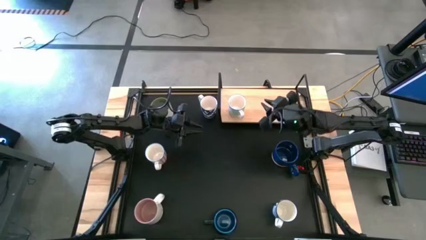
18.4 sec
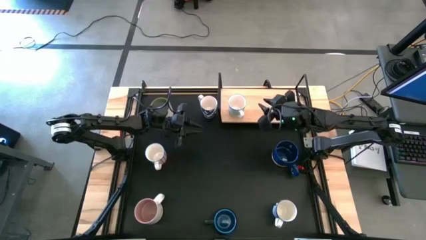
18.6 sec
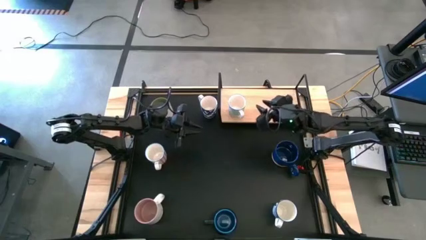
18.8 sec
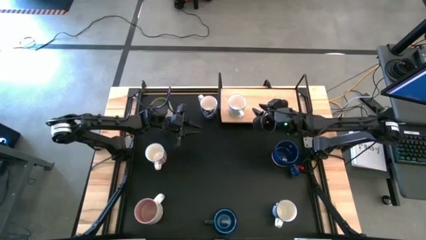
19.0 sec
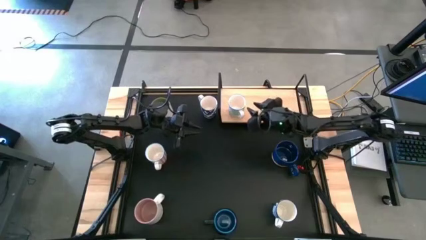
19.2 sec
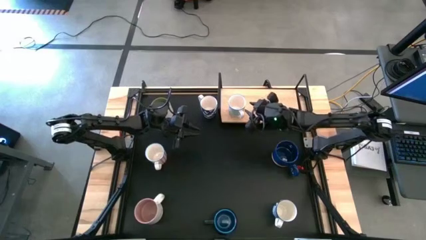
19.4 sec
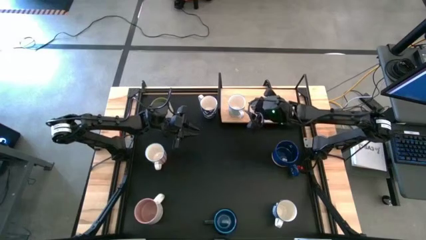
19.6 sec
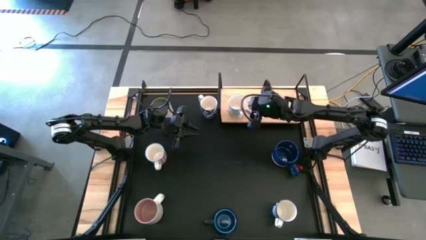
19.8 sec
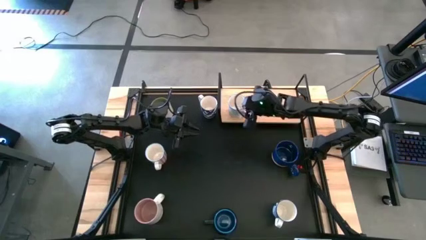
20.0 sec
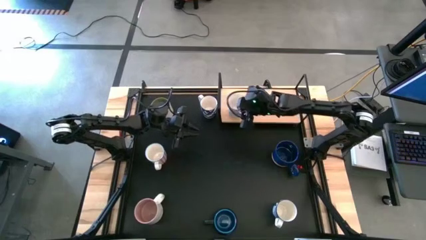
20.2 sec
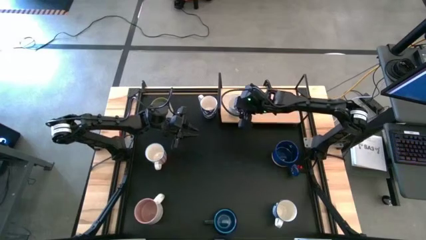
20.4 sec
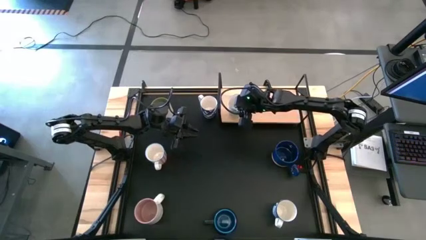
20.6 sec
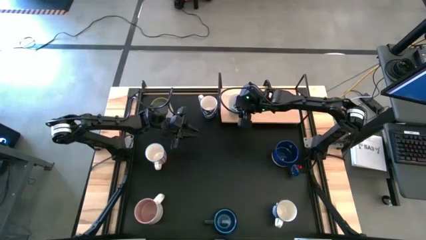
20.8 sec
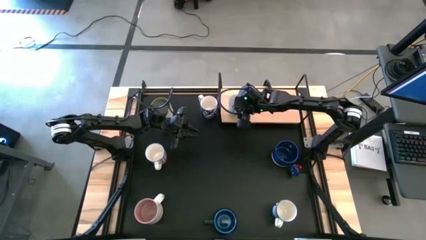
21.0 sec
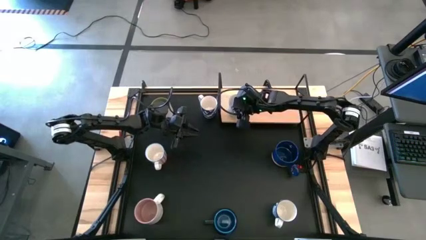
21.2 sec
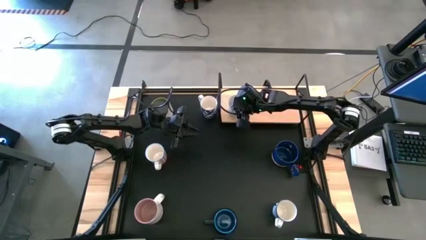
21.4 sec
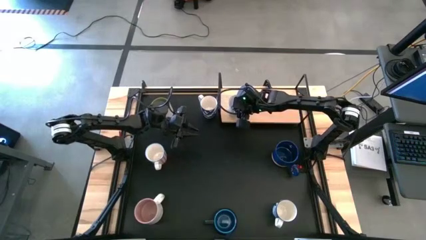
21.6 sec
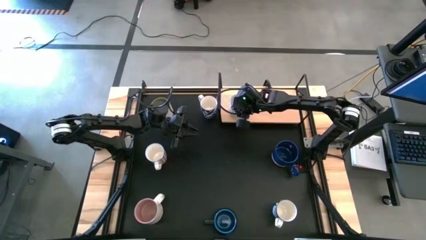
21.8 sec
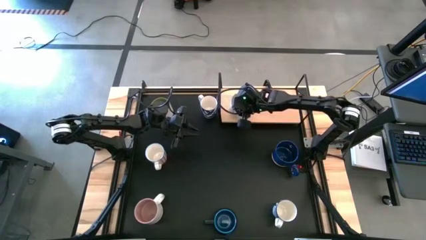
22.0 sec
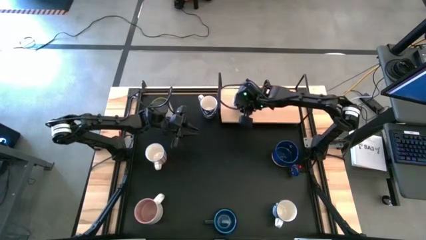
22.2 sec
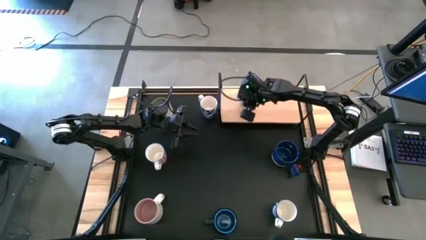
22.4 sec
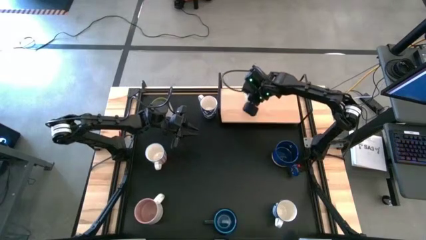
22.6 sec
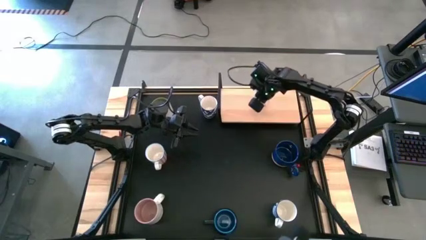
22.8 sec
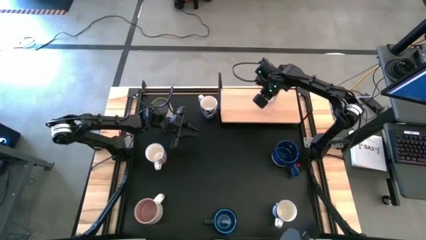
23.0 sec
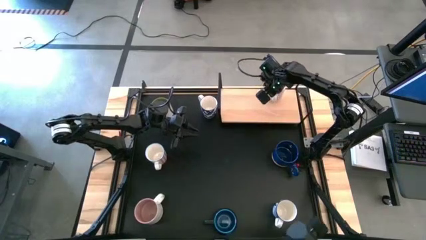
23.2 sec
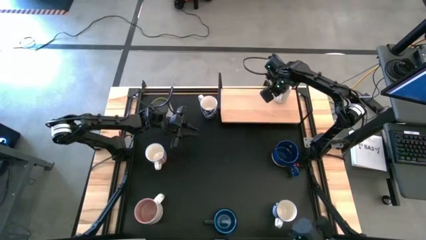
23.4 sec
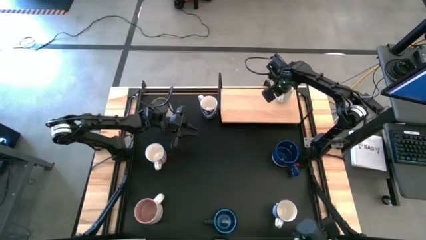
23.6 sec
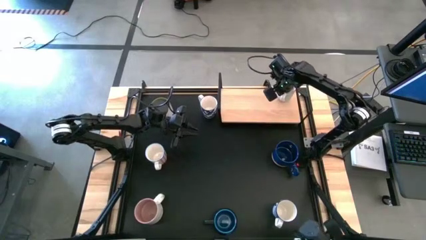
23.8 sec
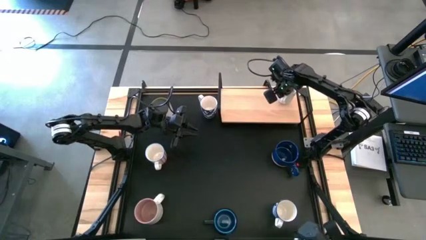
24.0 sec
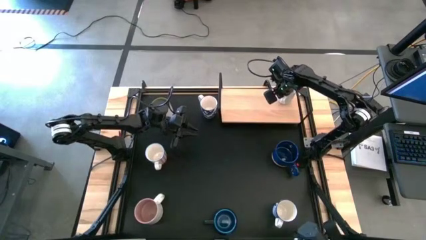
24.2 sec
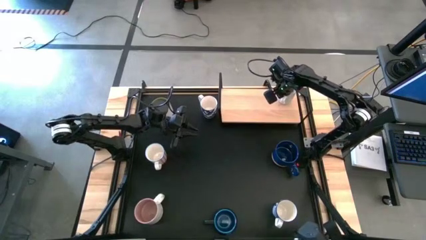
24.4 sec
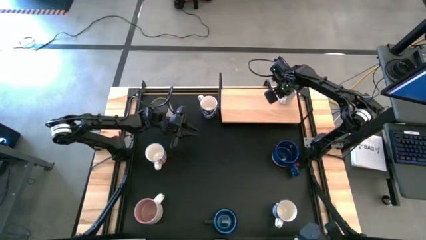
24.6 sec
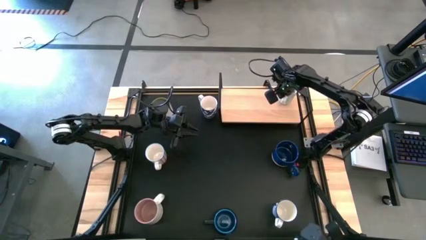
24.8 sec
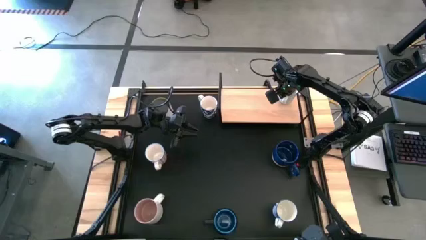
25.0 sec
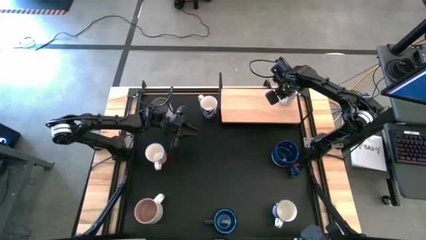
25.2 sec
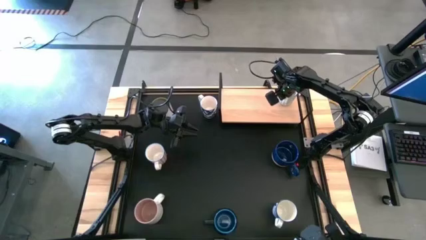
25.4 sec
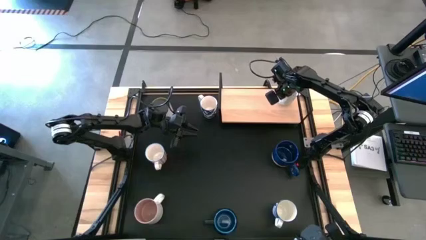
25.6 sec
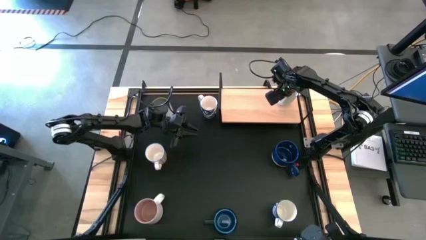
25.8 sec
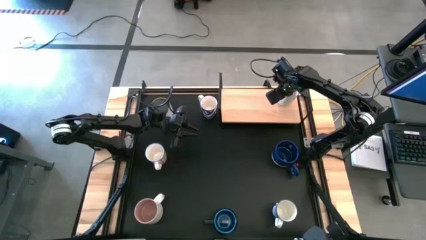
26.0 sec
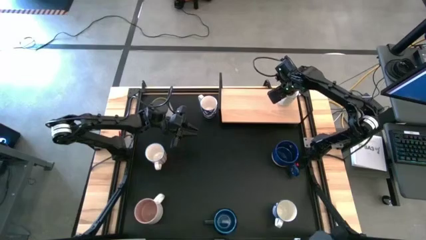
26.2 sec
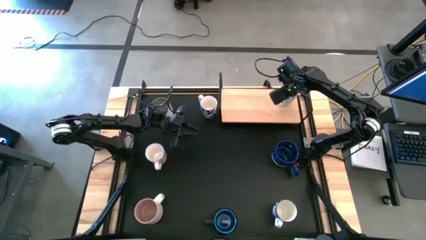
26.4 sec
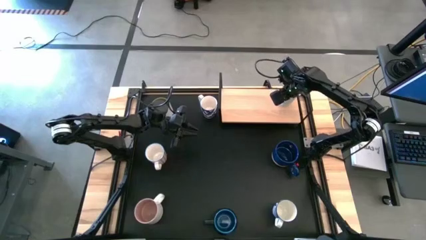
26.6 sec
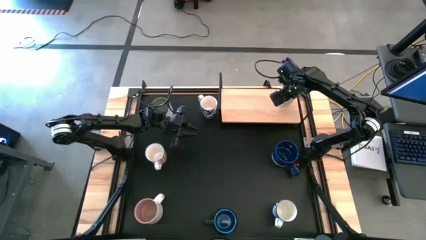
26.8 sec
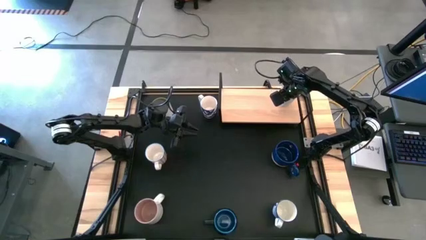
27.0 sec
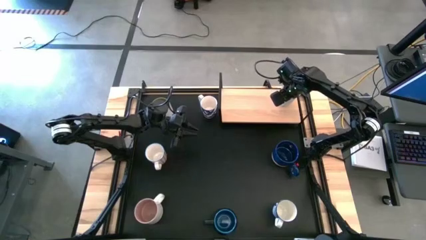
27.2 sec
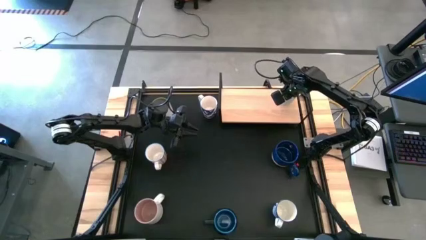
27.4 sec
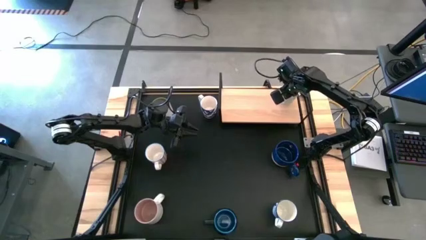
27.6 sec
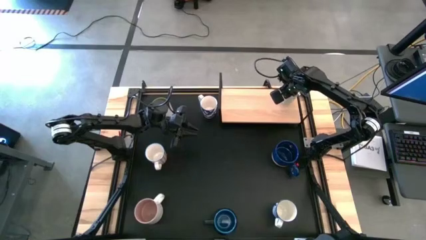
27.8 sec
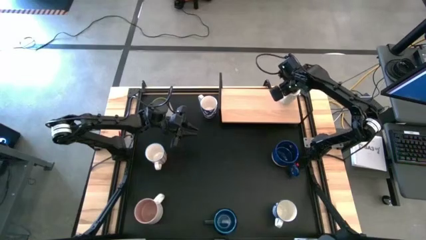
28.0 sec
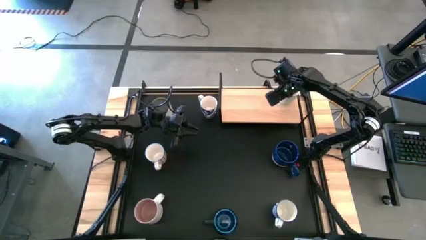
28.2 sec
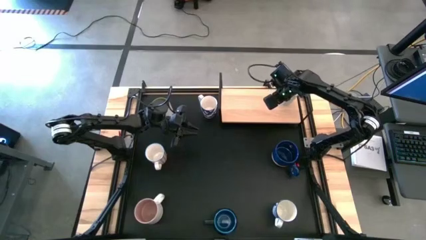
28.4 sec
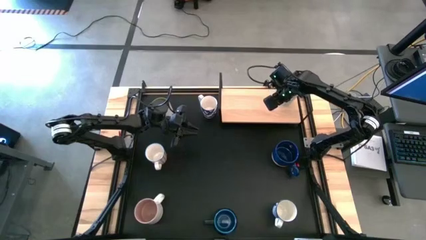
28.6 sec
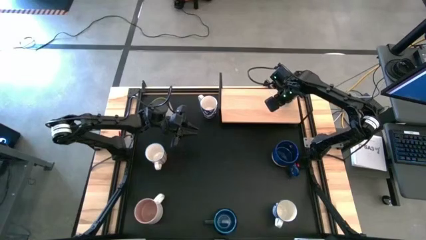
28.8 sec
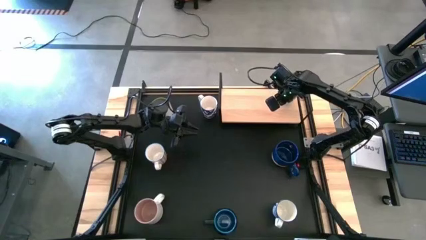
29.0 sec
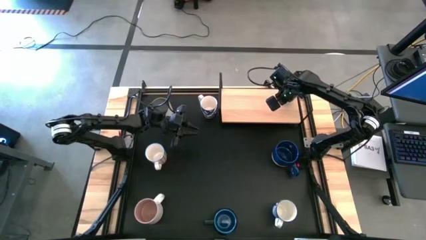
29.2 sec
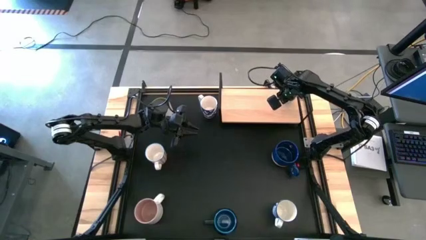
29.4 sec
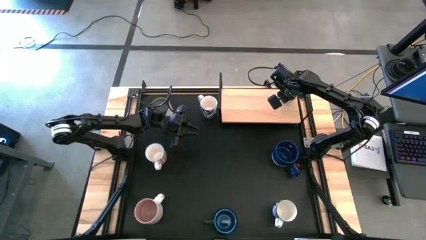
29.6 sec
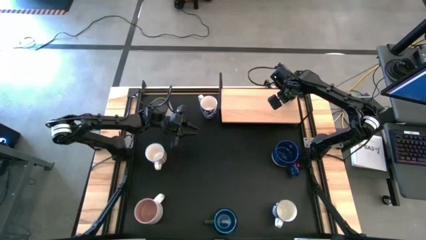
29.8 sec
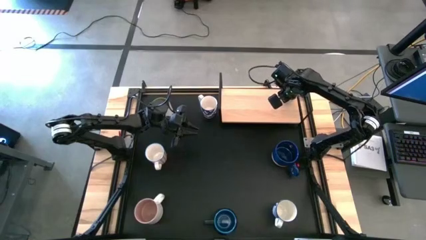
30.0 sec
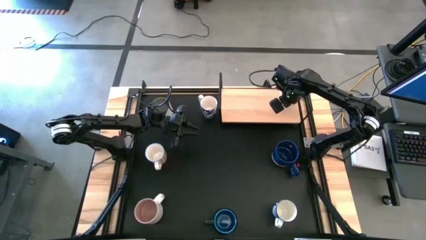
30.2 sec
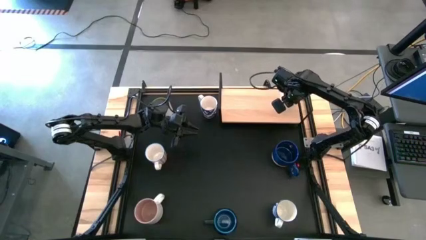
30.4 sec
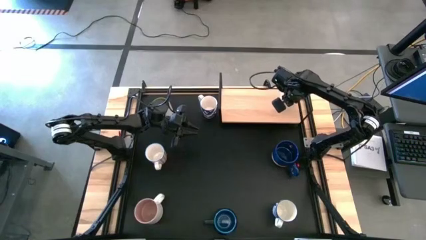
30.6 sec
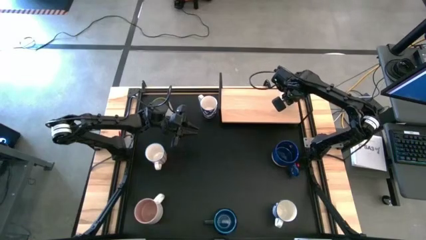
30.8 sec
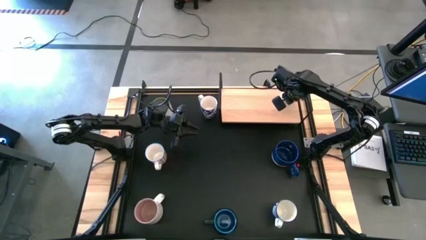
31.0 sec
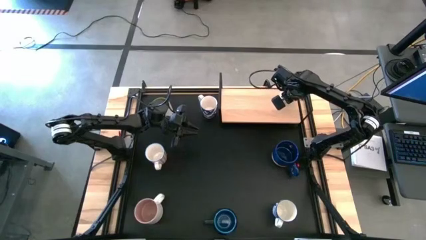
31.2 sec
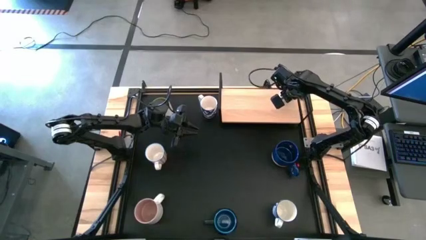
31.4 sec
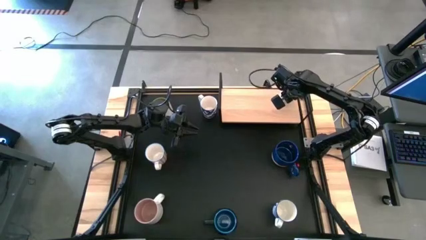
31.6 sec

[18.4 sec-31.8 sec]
Task: Place coffee mugs
Put the light blue patterned mug on the shelf

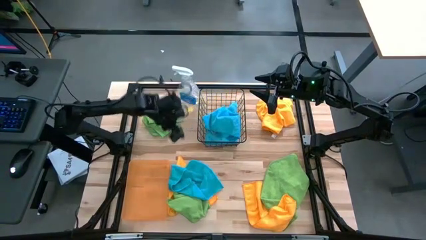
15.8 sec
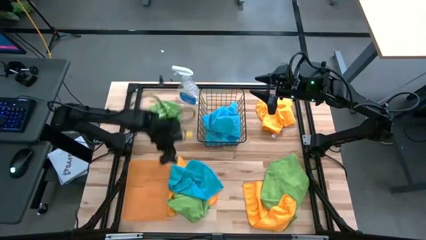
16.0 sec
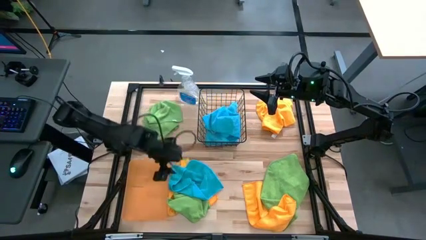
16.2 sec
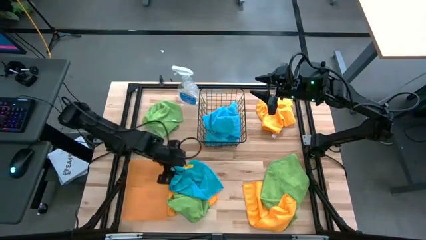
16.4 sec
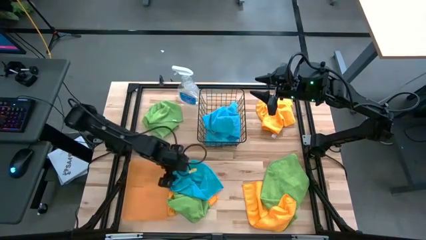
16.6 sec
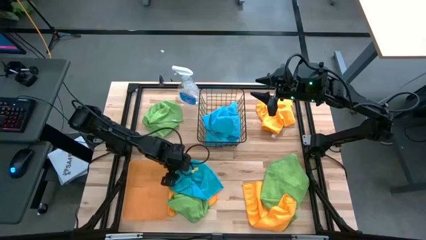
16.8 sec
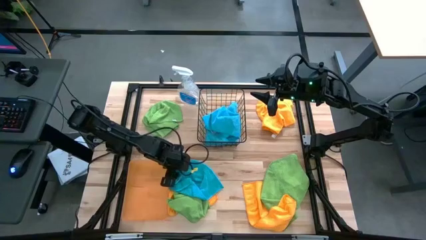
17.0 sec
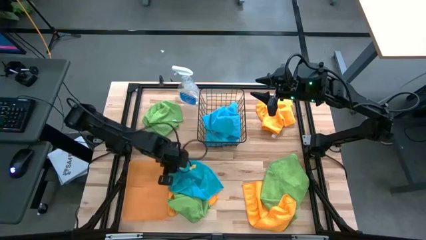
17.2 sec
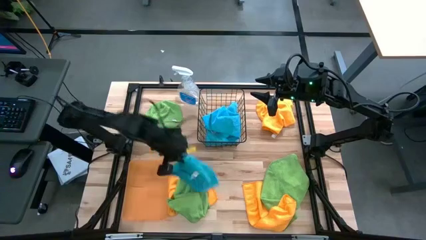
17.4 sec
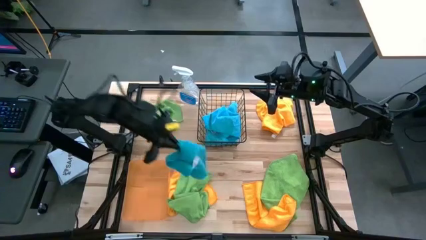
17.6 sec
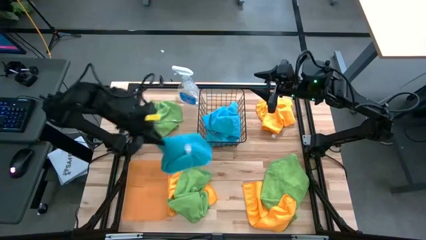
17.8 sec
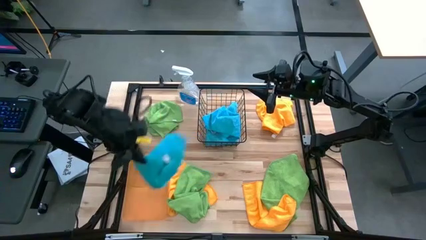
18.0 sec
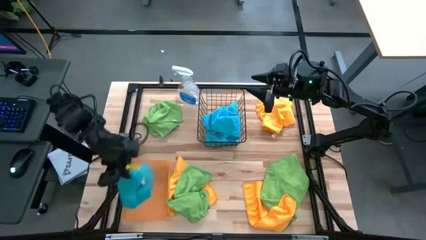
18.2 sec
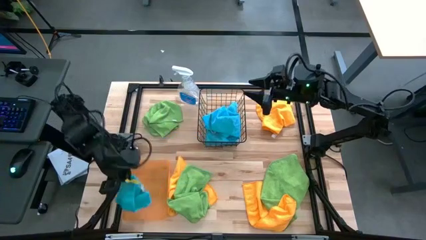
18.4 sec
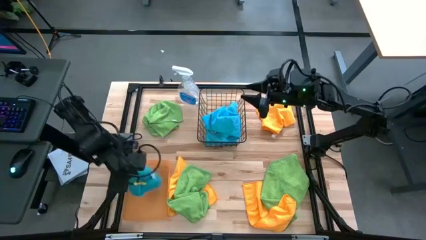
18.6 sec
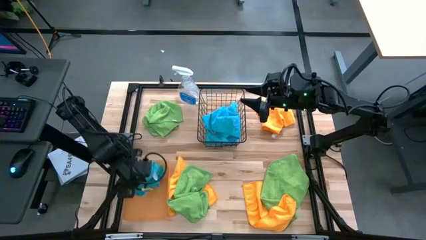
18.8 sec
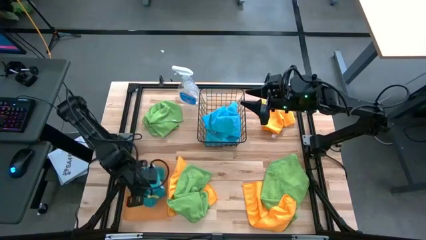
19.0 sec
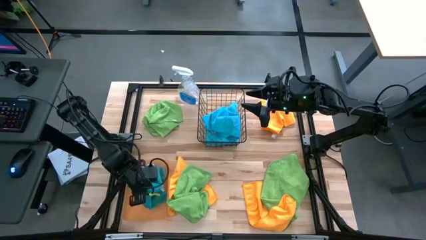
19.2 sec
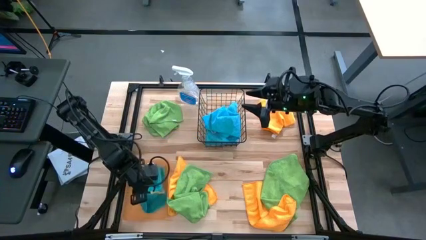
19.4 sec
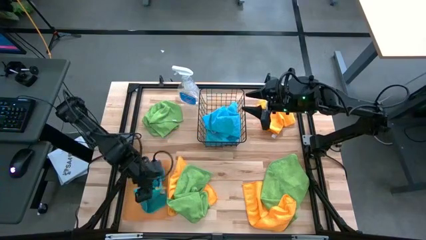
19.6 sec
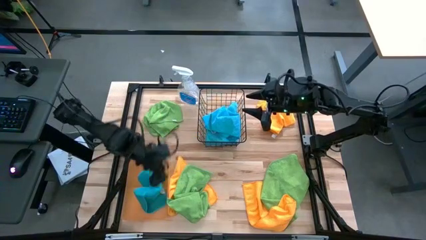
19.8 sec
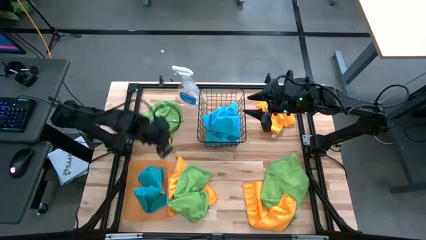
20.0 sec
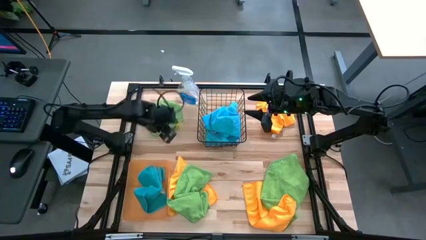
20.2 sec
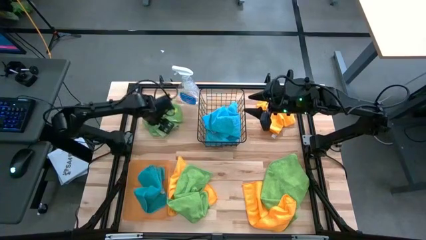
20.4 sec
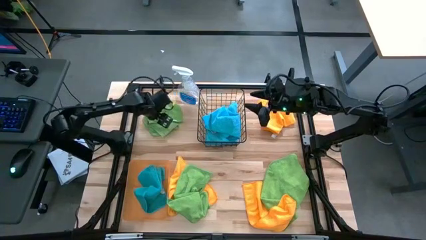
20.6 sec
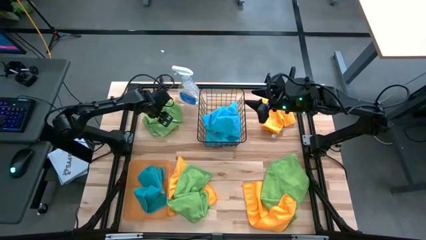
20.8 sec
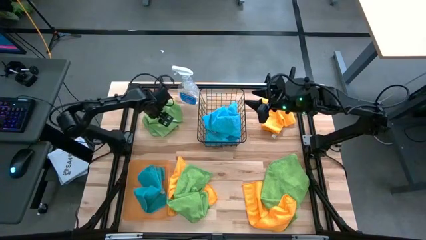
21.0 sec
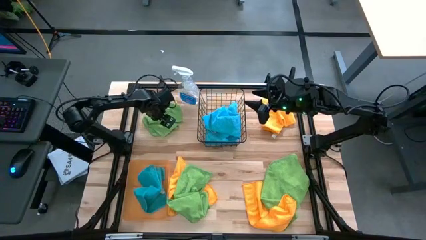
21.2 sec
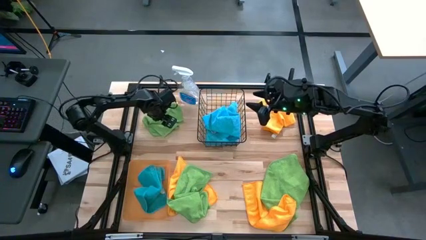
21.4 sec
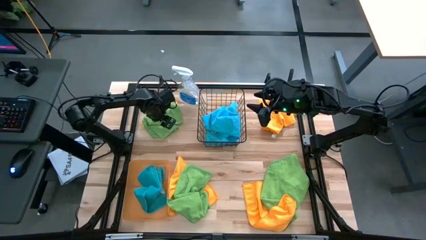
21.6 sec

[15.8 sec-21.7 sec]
Task: Sort microfiber towel by color & place in baskets
Put the blue towel into the black basket
